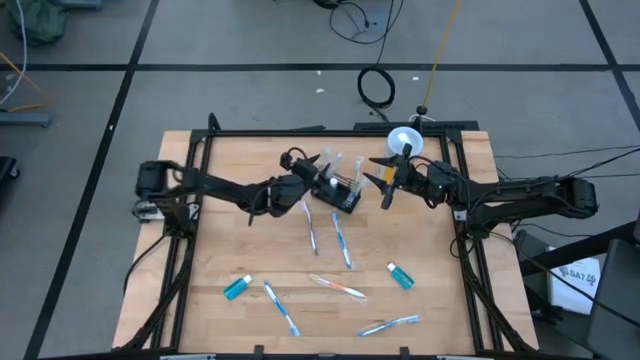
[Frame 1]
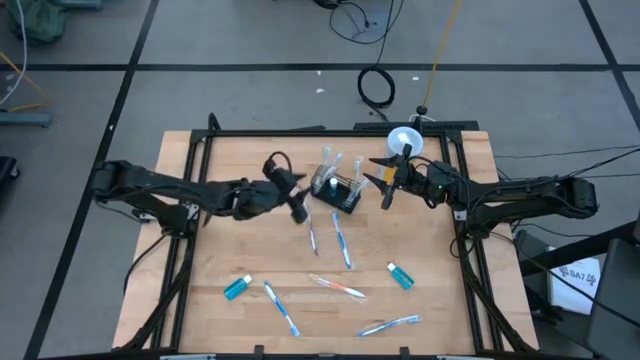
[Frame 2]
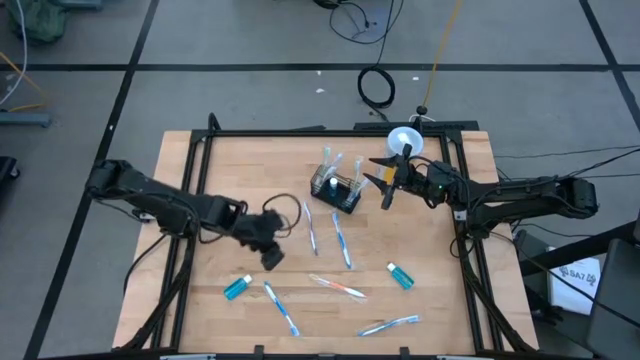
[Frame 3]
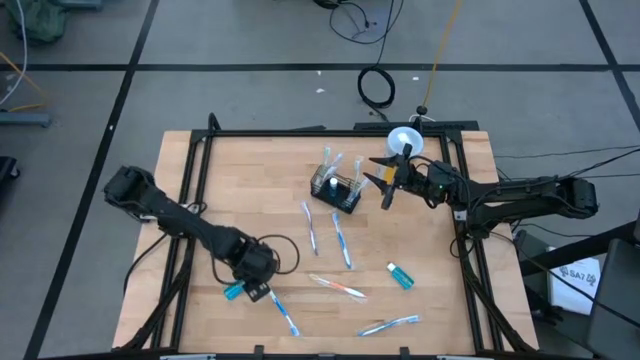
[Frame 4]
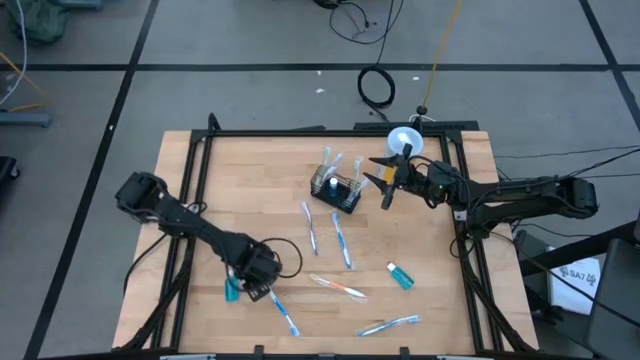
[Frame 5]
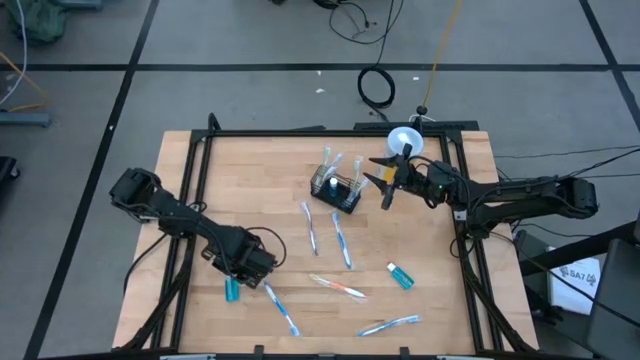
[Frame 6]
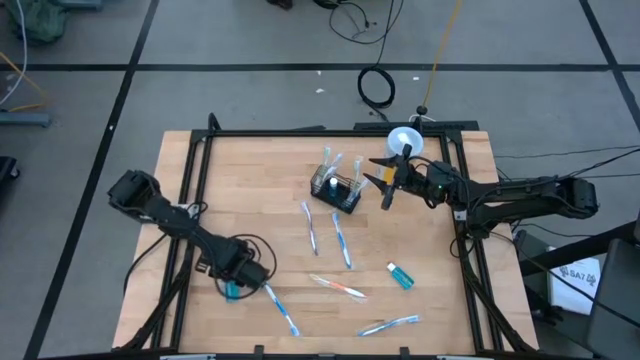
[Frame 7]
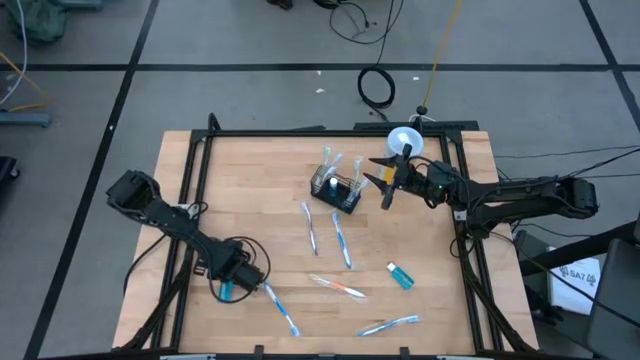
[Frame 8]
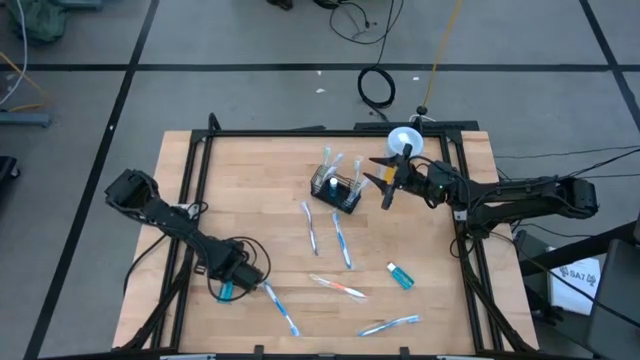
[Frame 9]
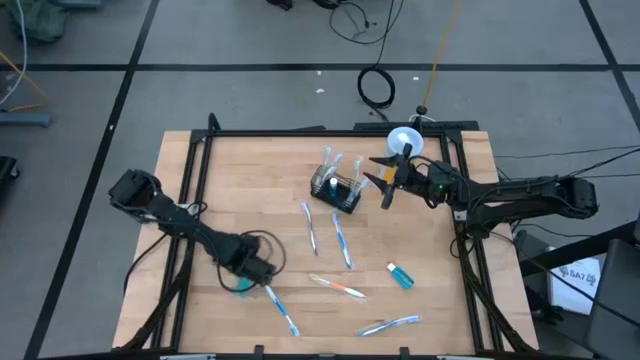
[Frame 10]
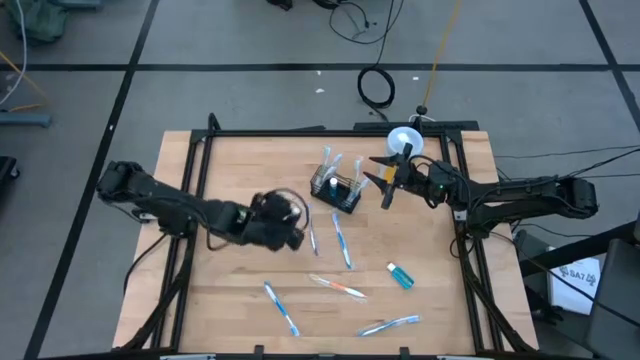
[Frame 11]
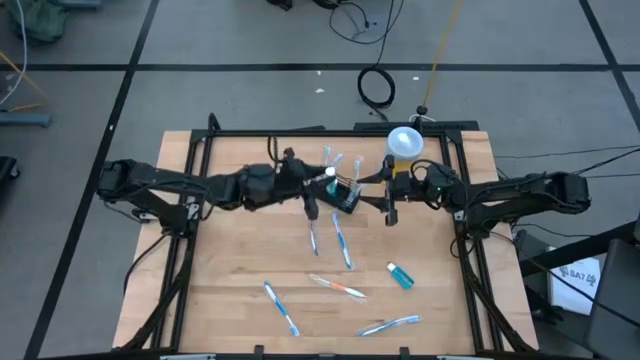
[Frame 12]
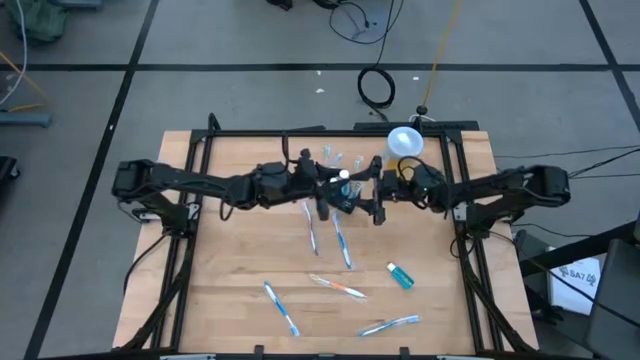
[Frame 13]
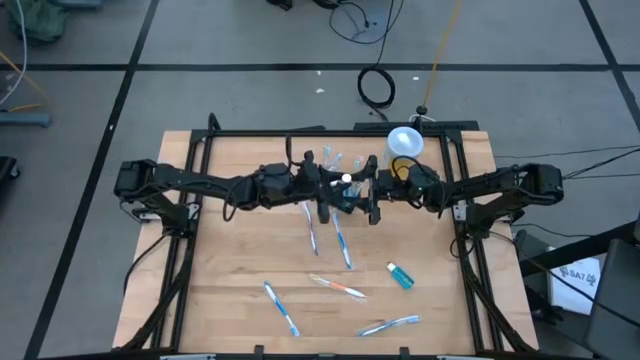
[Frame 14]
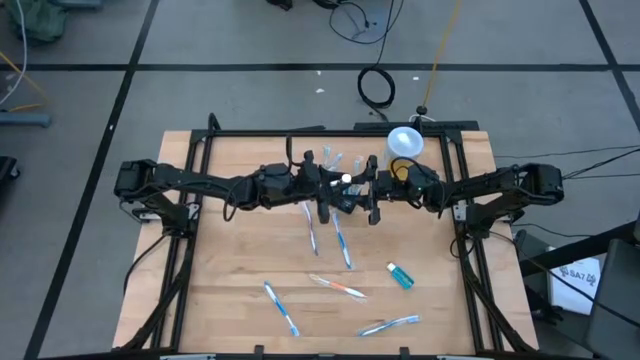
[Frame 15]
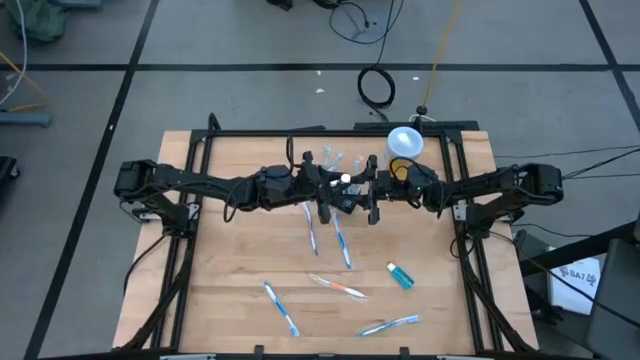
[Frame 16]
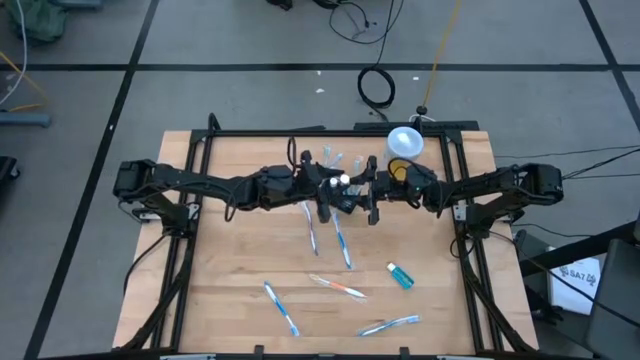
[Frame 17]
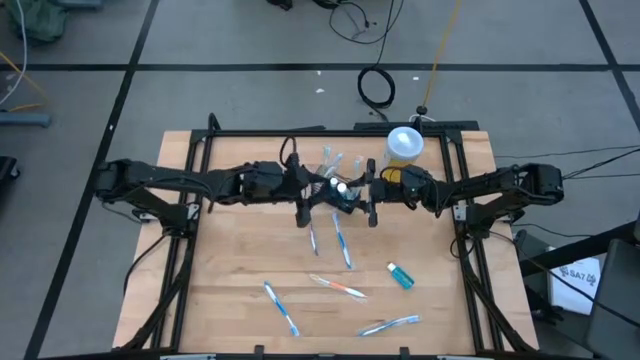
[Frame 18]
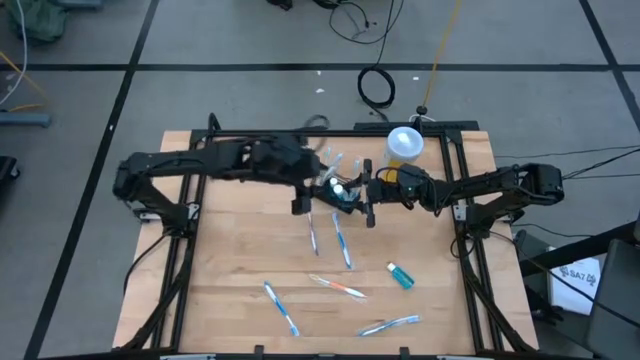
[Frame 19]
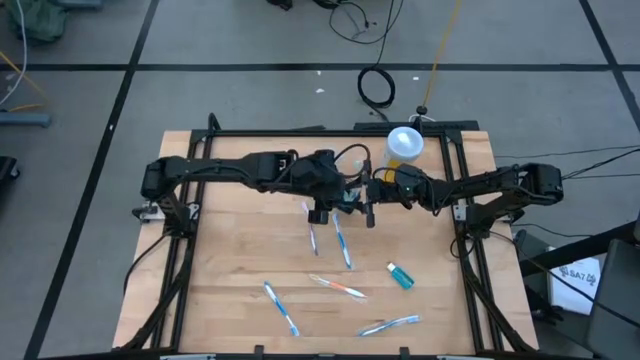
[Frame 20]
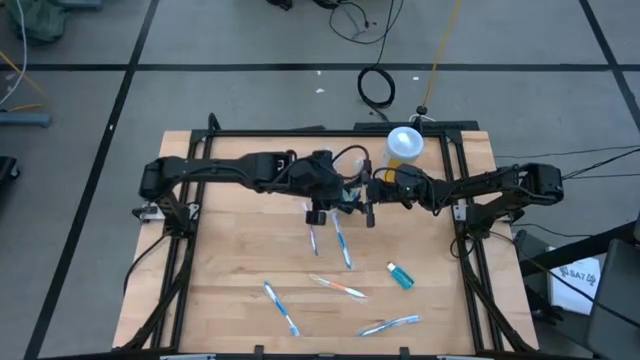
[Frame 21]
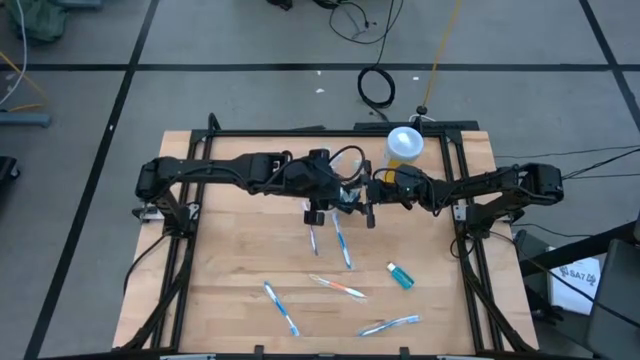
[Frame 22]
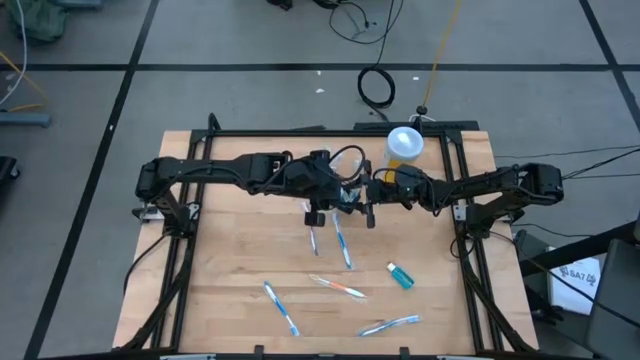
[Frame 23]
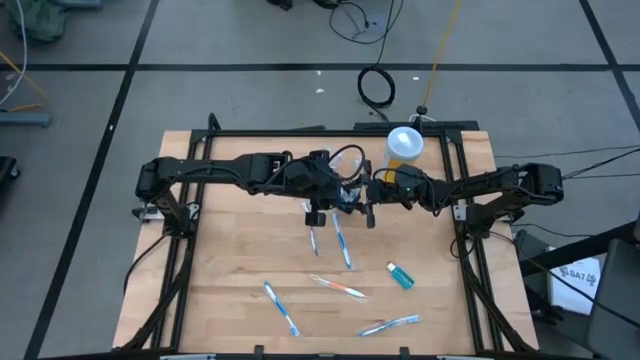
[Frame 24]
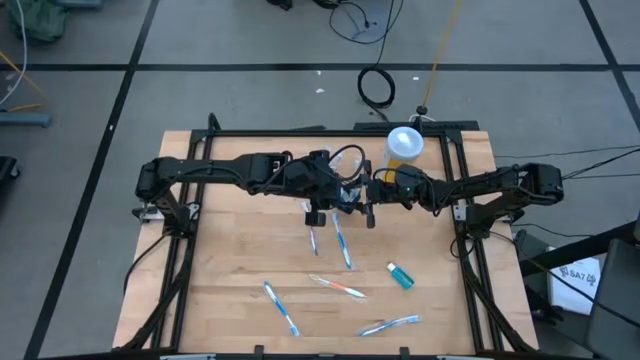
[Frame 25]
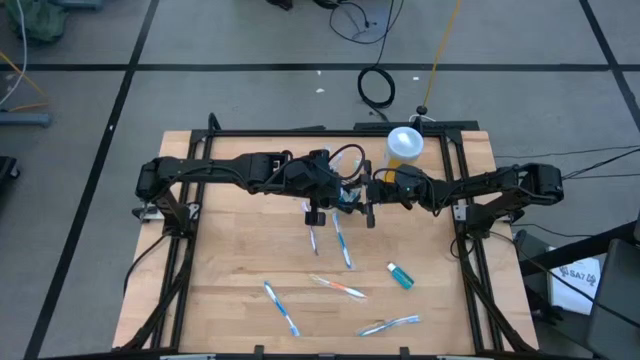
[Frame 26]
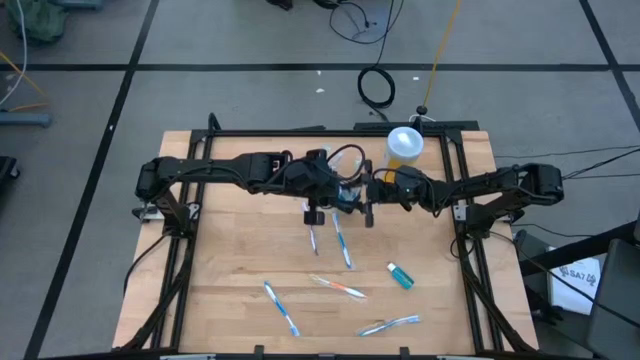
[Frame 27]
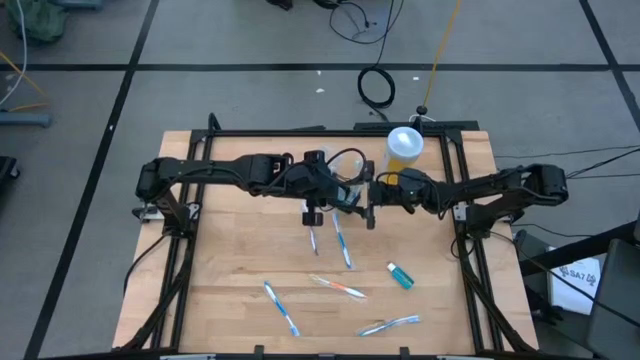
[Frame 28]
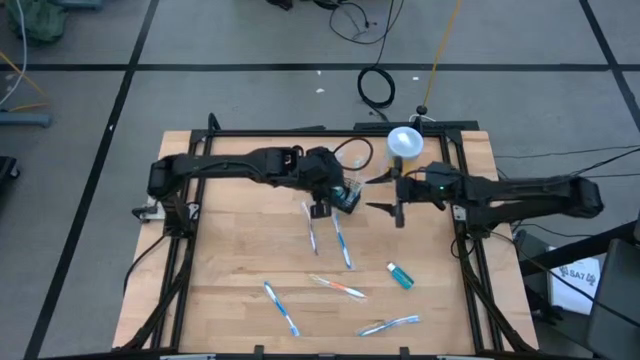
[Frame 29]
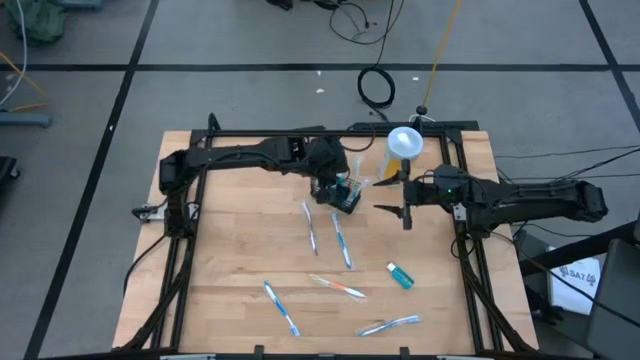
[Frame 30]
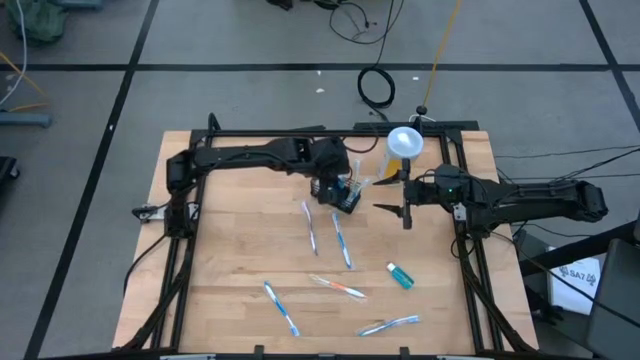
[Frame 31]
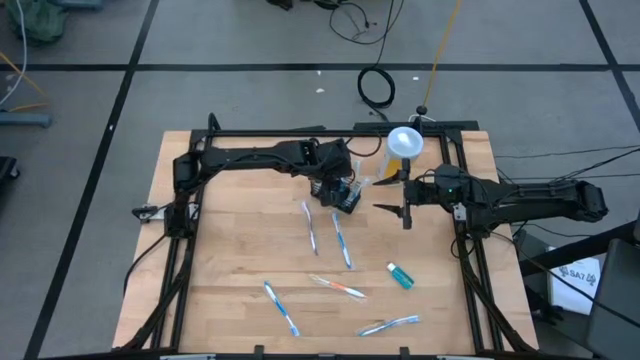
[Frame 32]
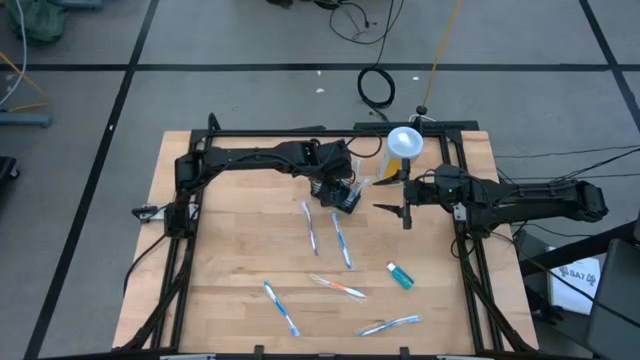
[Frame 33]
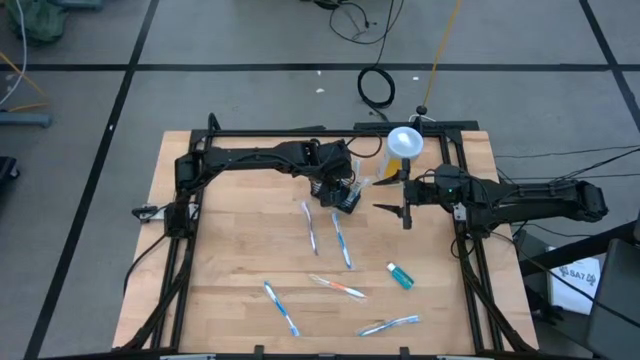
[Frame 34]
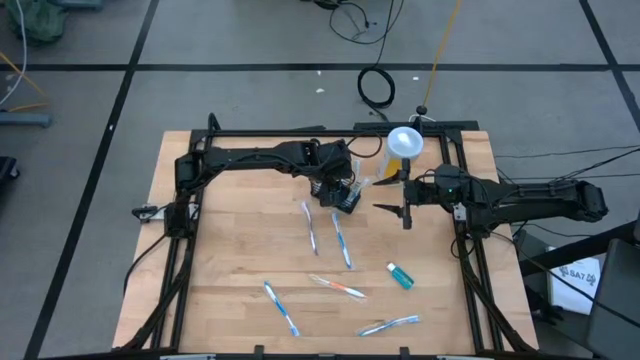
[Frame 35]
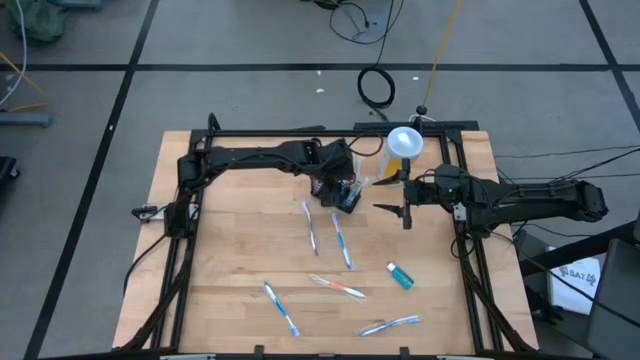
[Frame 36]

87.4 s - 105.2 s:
Task: Pick & Place toothbrushing station
Put the blue mouthwash bottle into the black organizer

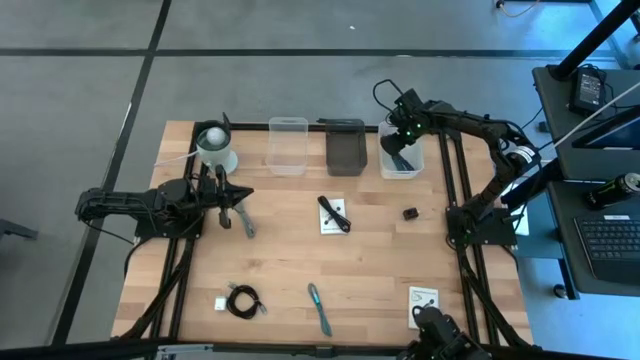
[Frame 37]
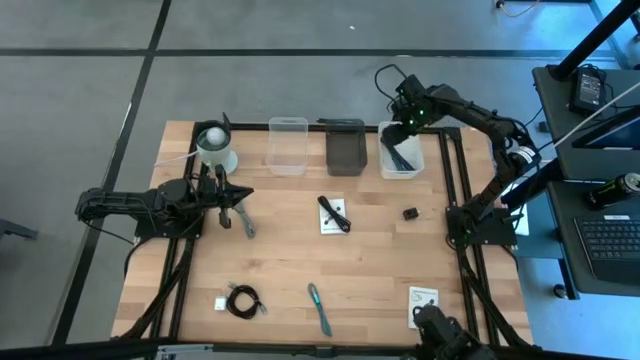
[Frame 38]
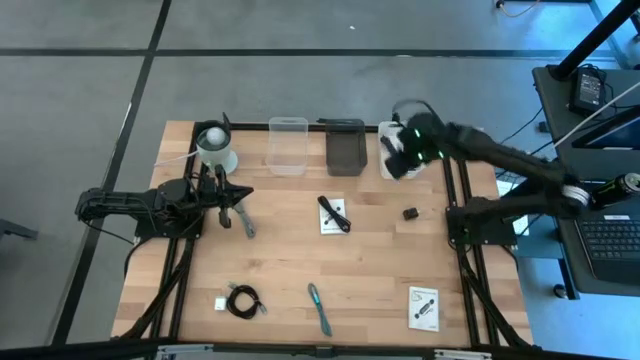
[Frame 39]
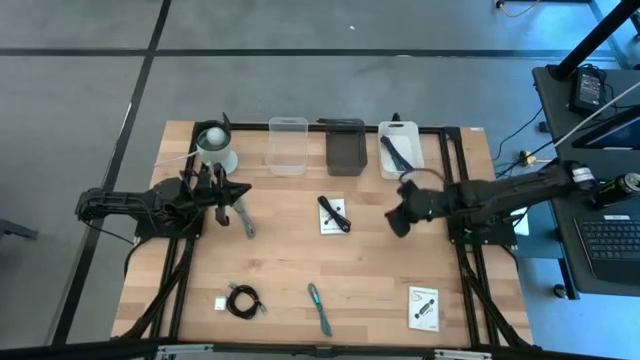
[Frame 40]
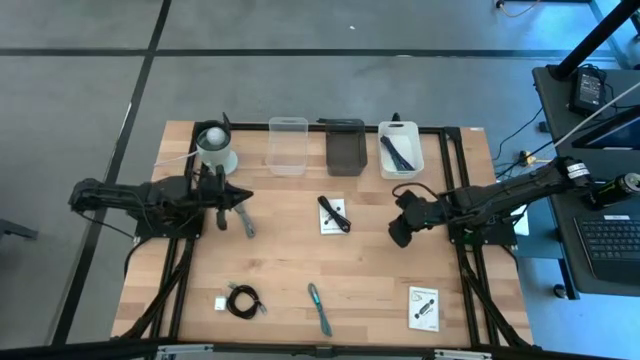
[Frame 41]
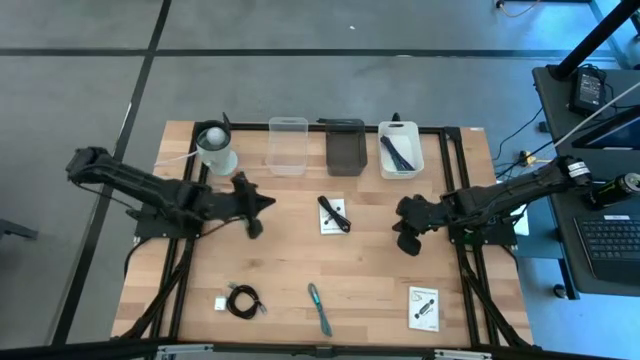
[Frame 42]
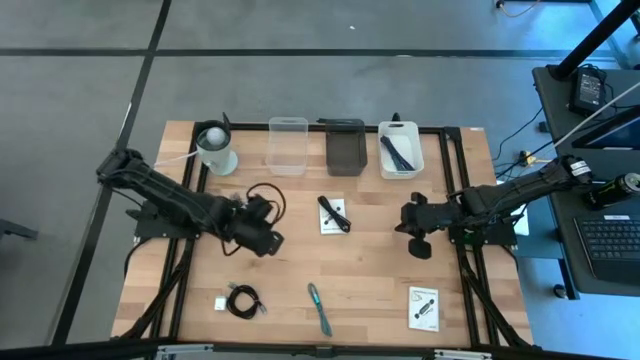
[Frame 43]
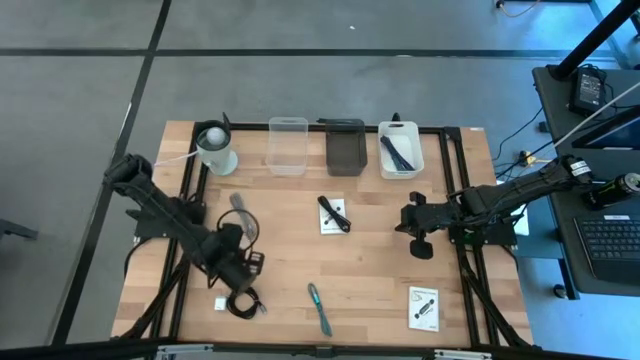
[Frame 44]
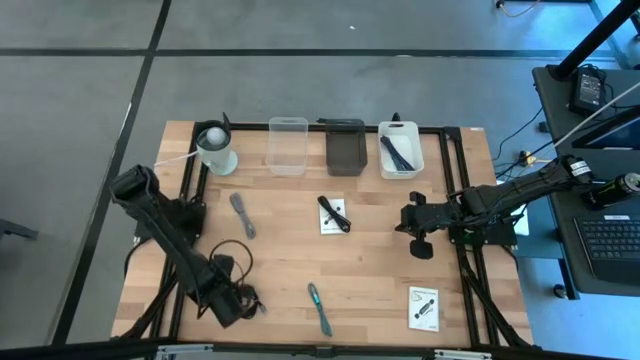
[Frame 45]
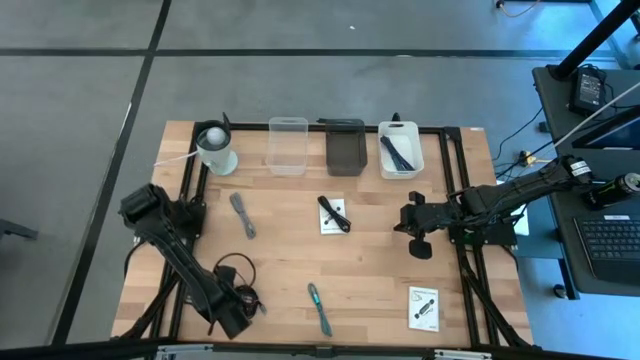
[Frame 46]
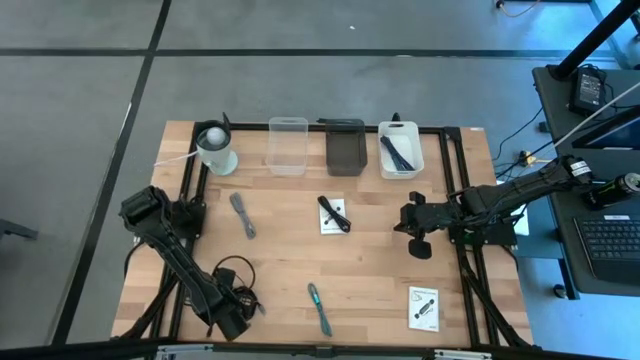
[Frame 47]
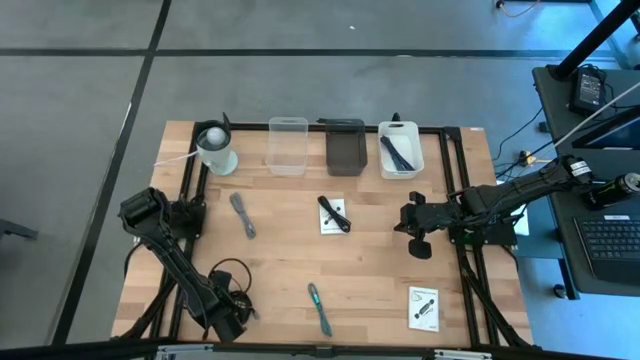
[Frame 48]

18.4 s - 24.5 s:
Task: Pick and place items into bin
Put the white charger adapter into the transparent bin
